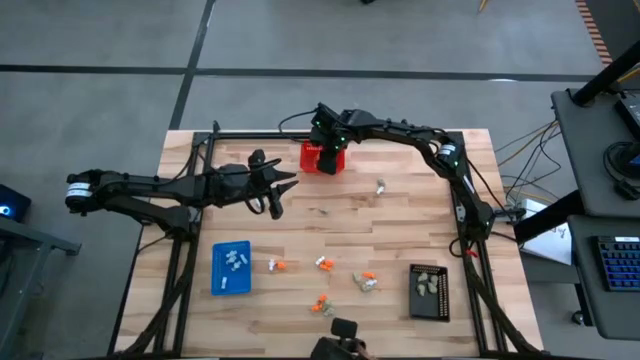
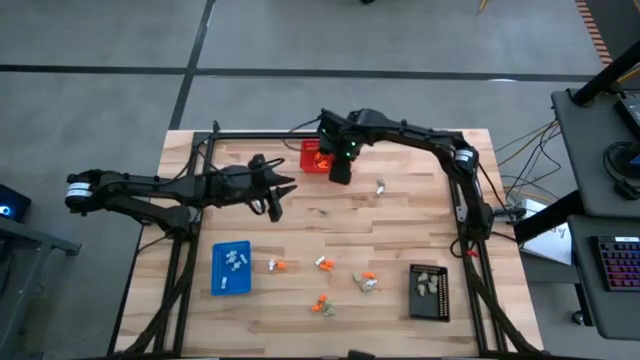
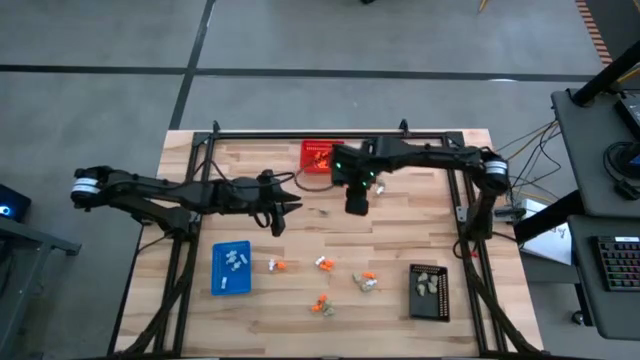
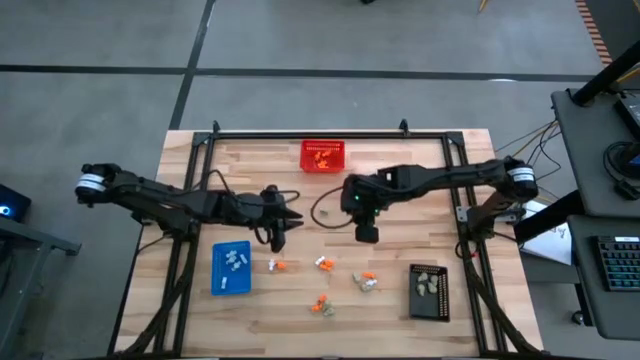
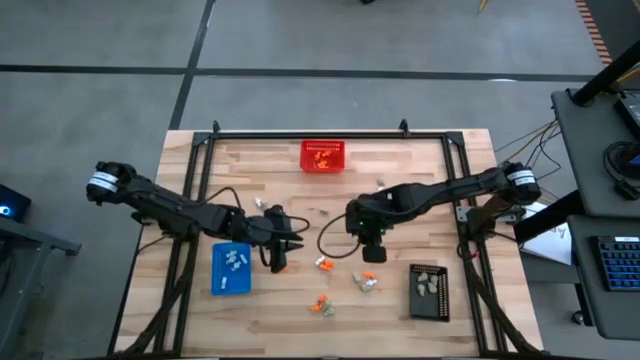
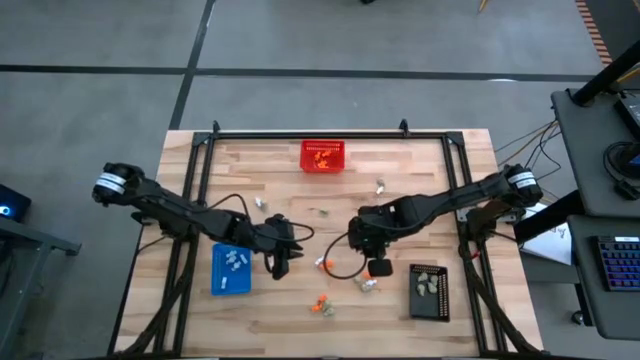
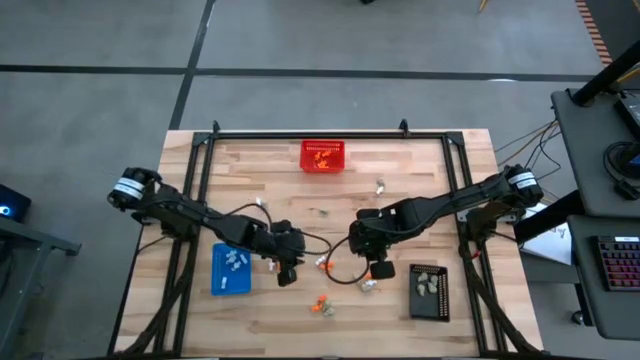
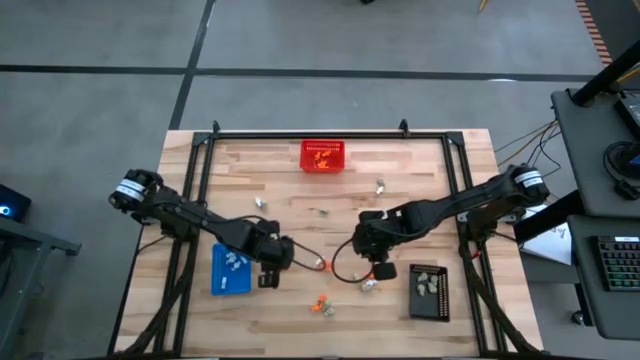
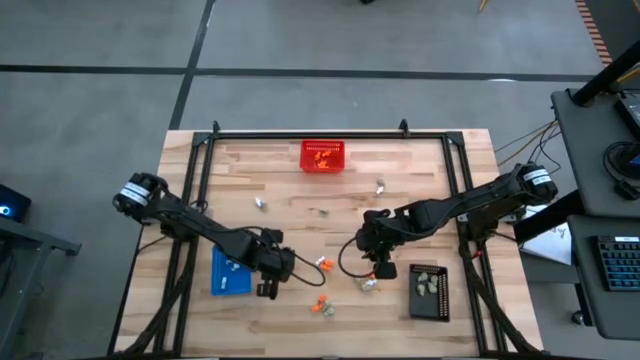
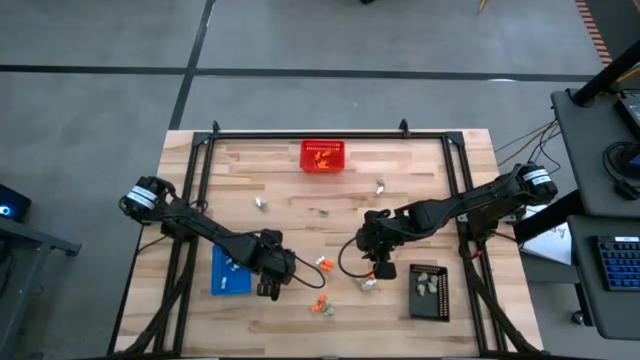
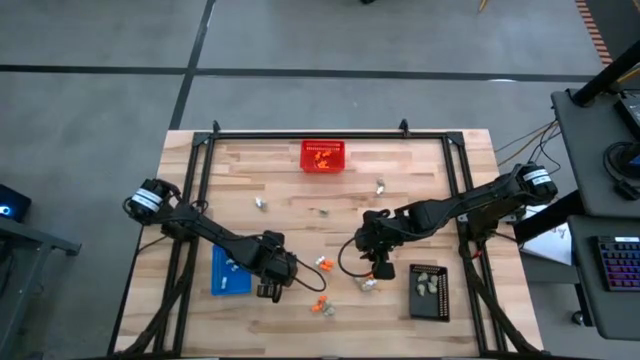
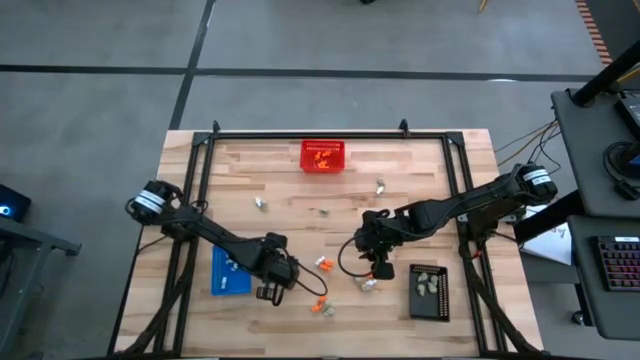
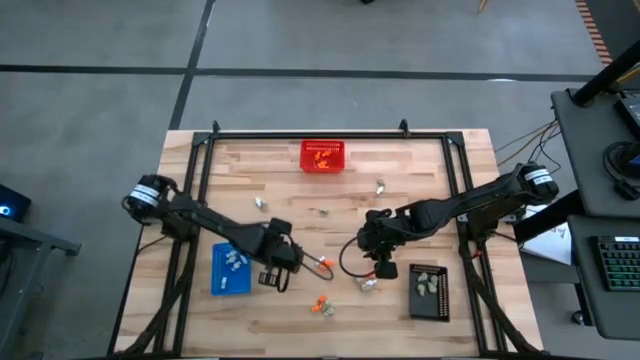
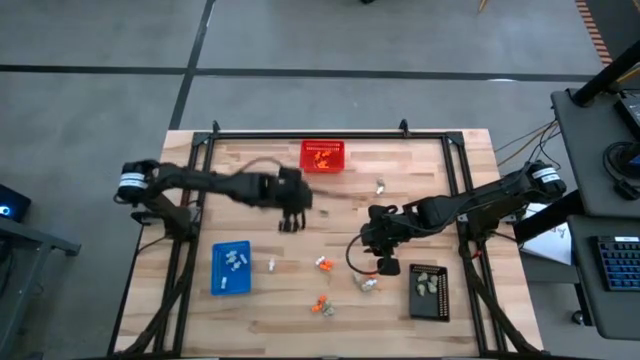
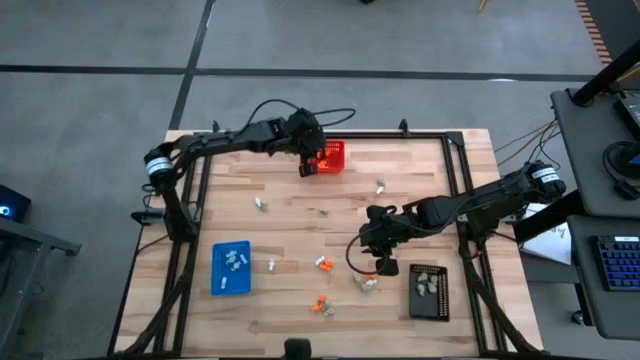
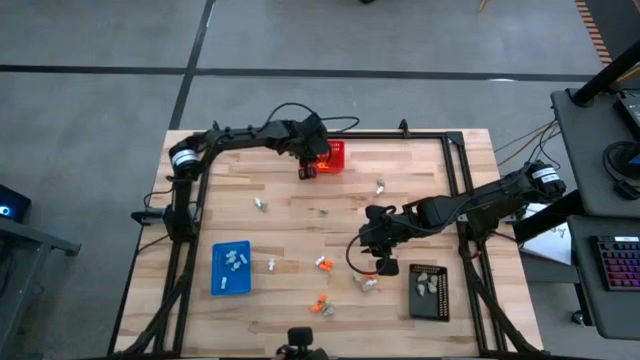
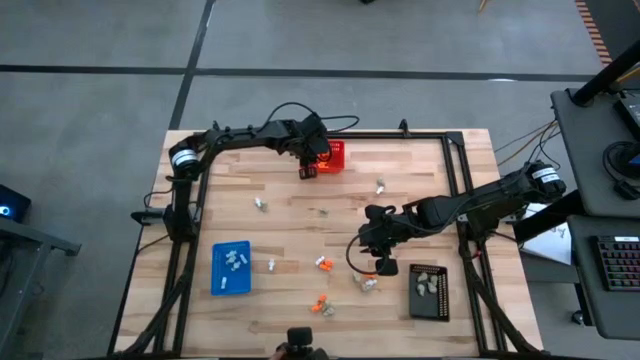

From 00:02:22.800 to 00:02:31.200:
Task: Sort Halloween decoration
Put the orange skeleton toy into the red bin

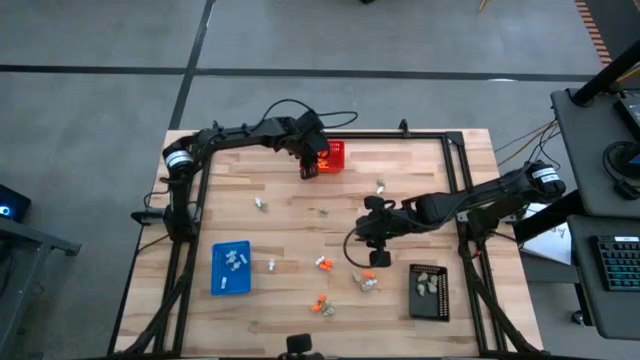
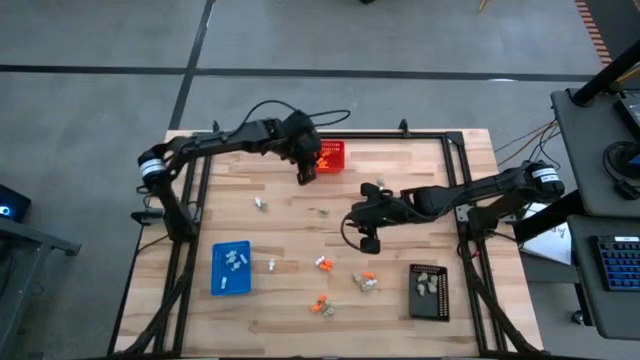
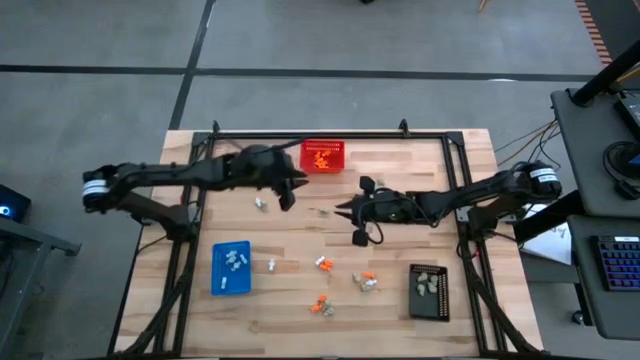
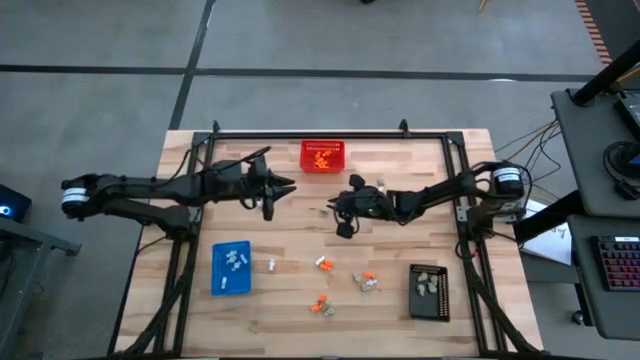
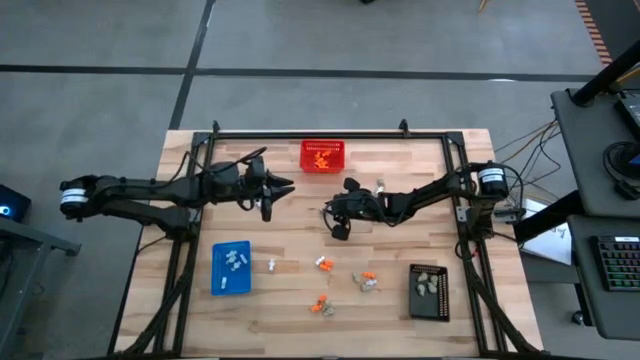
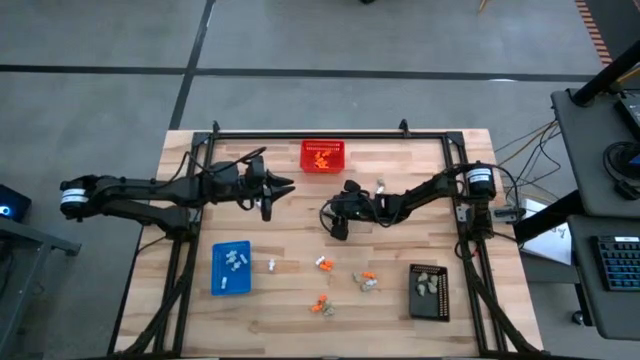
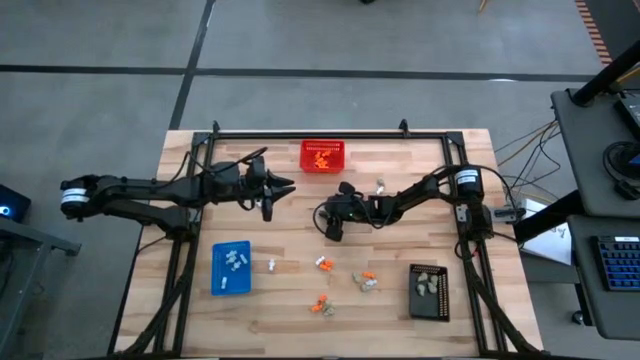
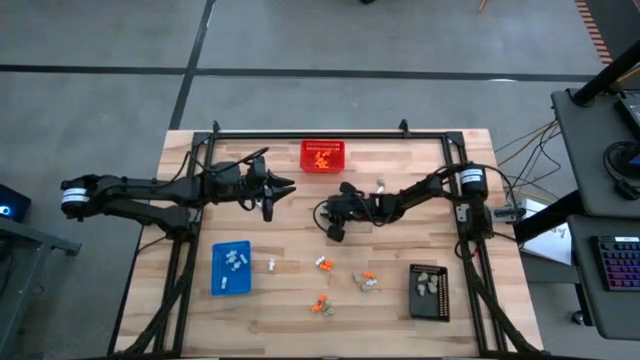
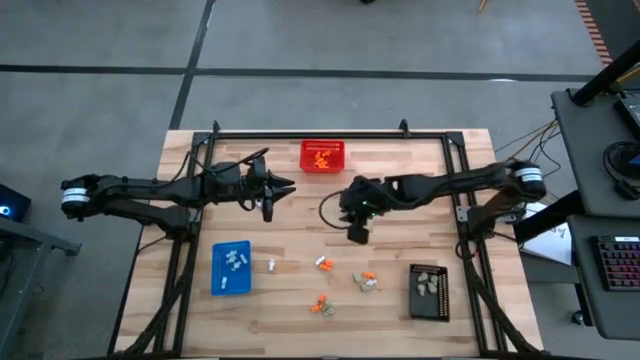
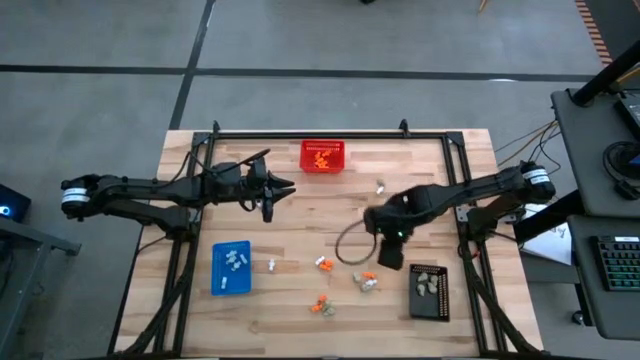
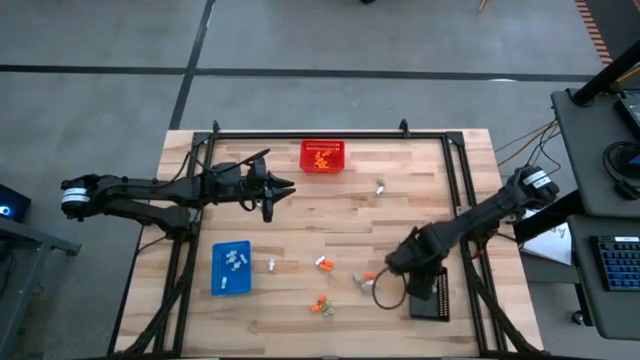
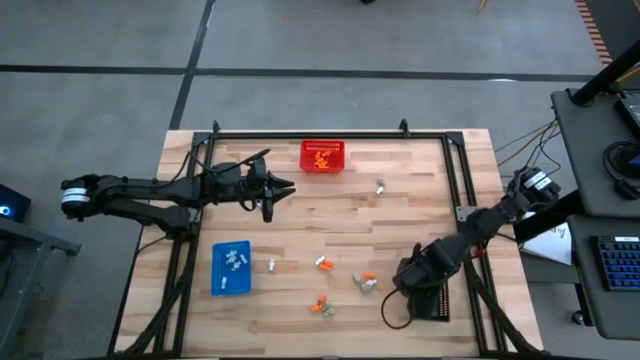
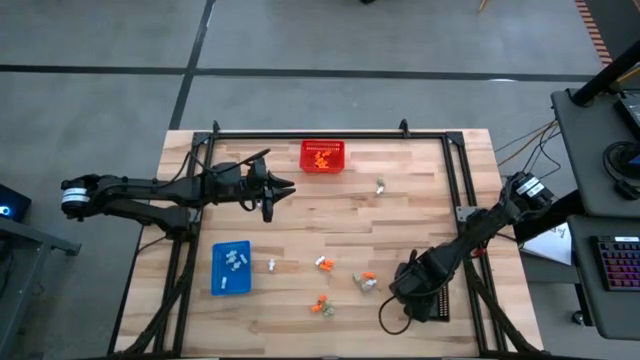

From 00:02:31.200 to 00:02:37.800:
Put the gray skull toy into the black bin

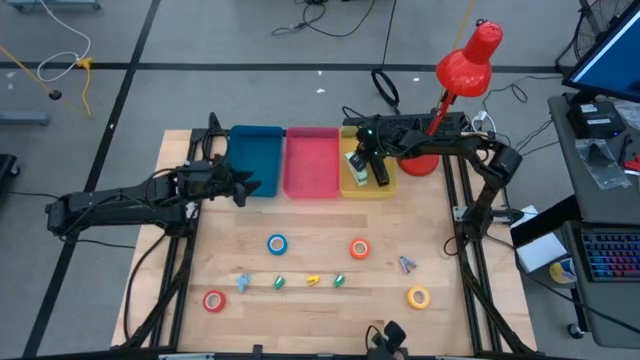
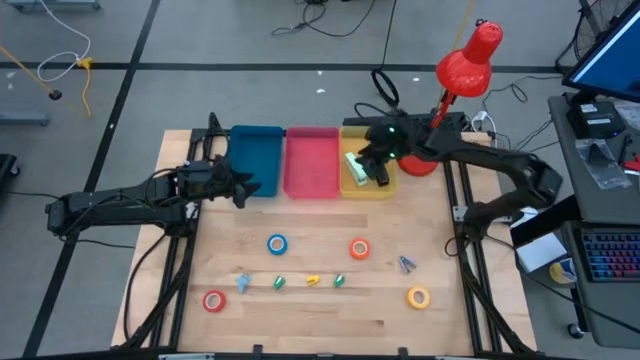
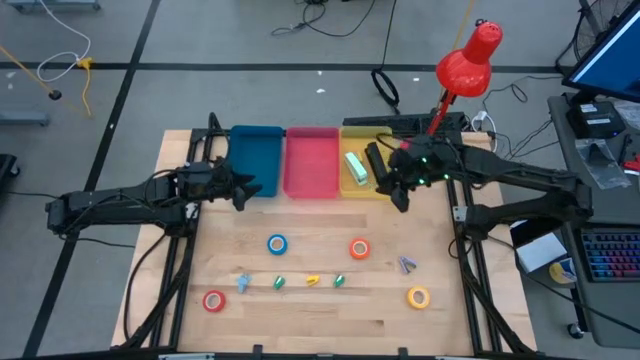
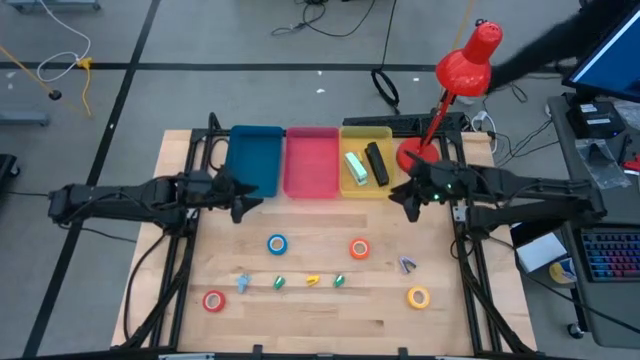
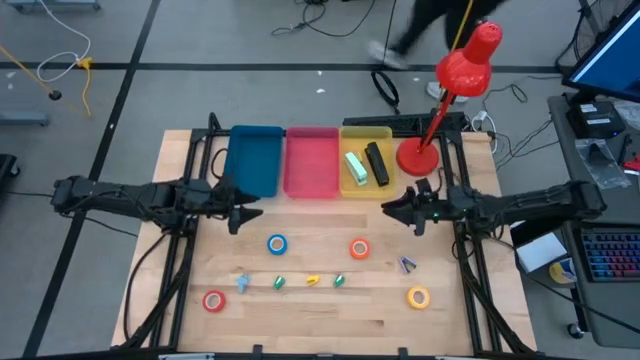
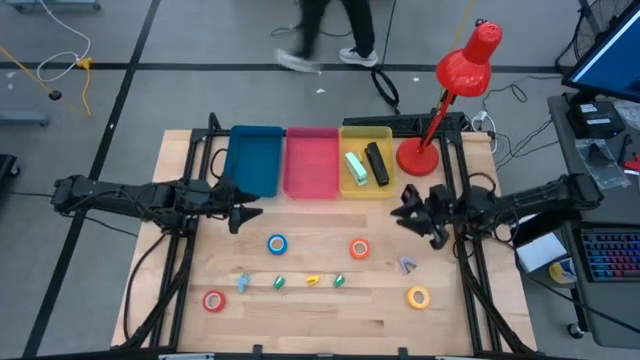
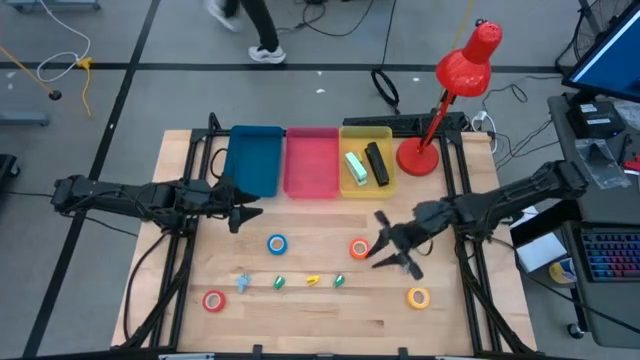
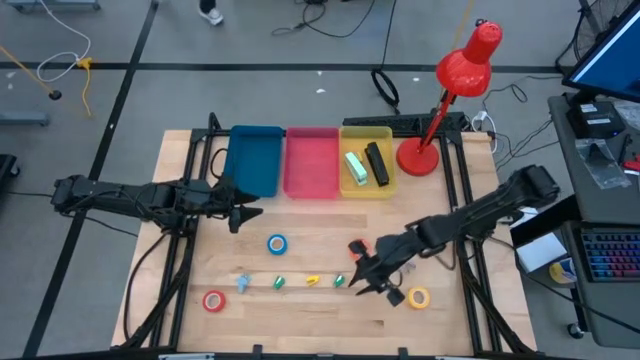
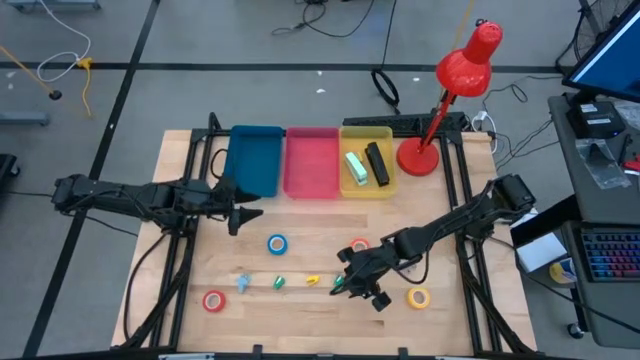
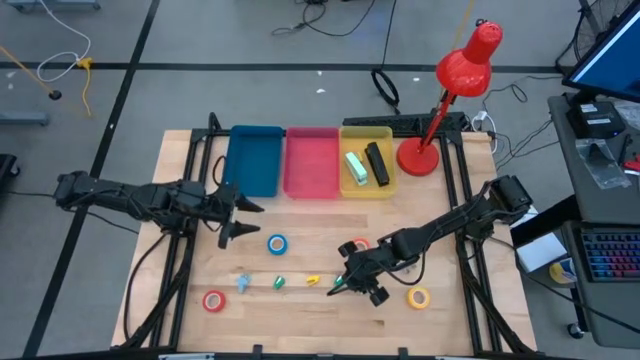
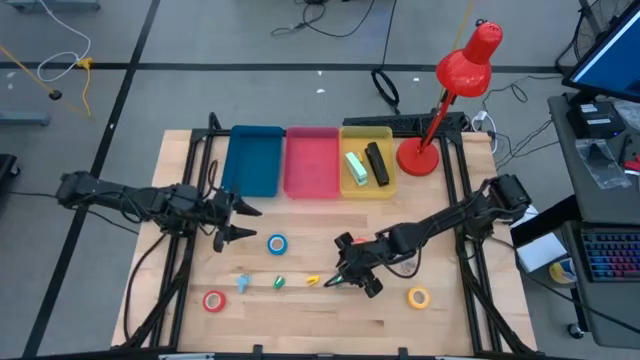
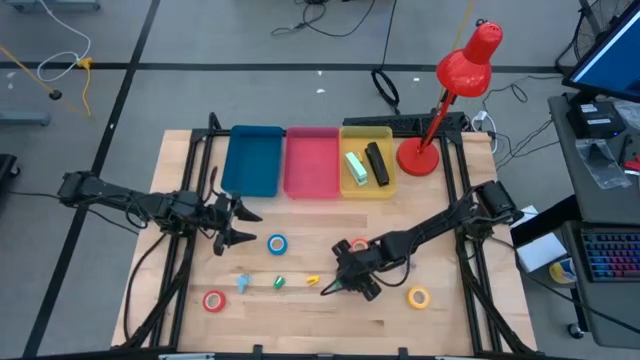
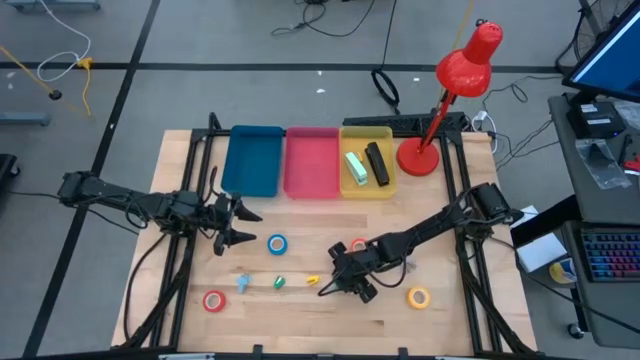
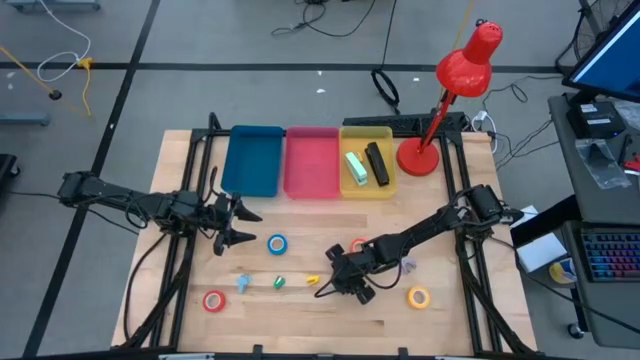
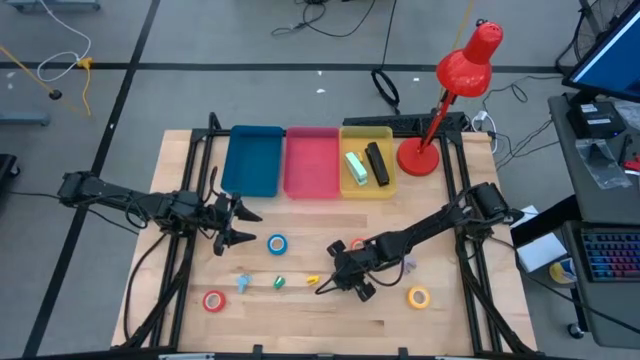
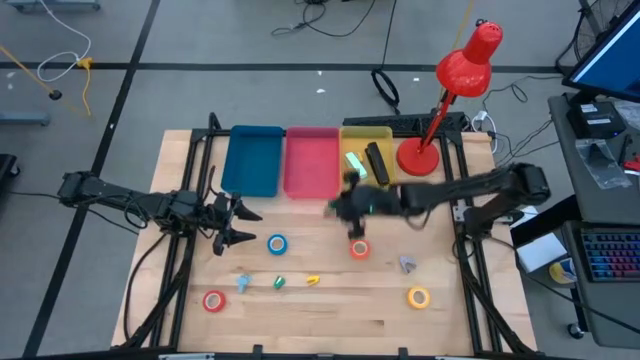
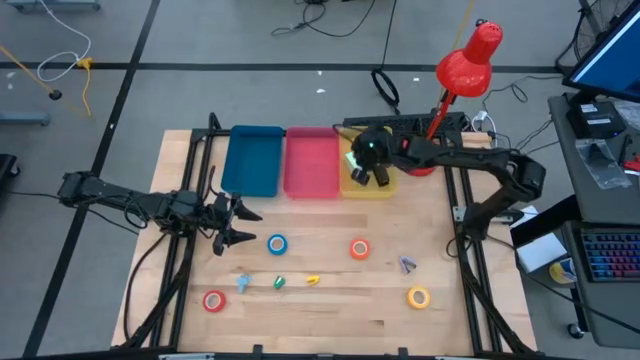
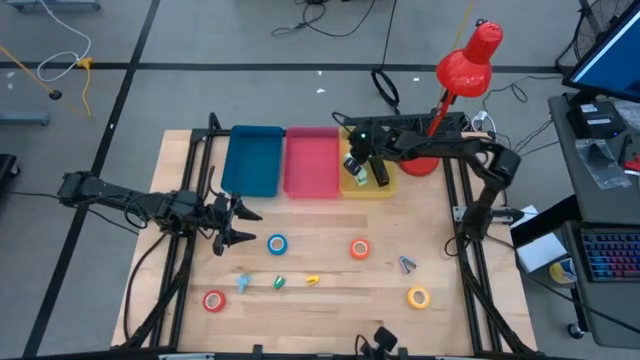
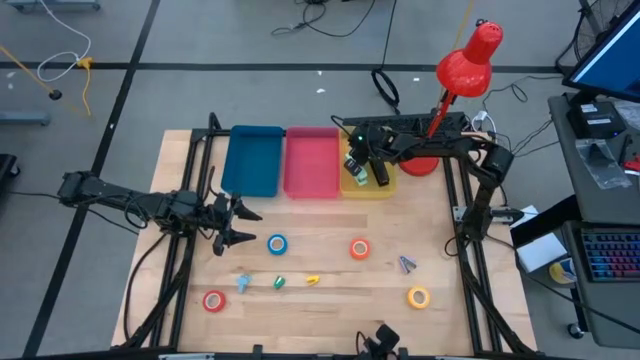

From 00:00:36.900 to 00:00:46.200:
Task: Pick and place Stapler, Stapler remover, tape
Put the green stapler into the yellow bin
